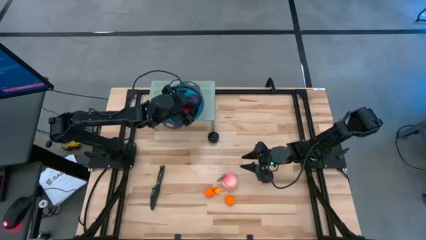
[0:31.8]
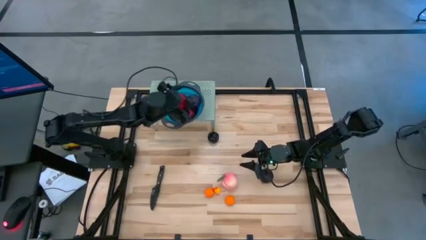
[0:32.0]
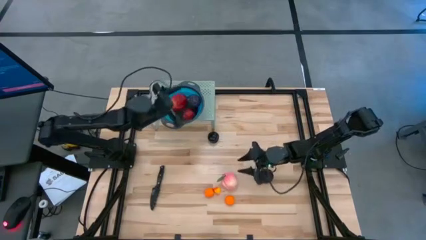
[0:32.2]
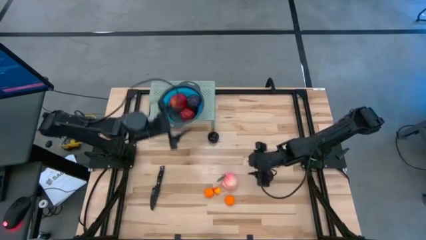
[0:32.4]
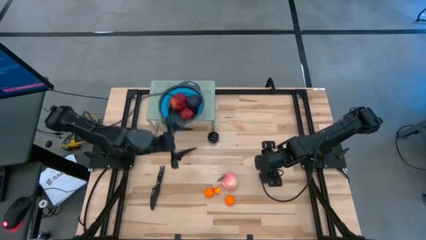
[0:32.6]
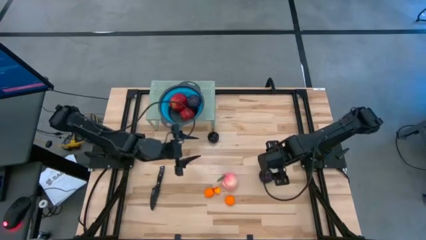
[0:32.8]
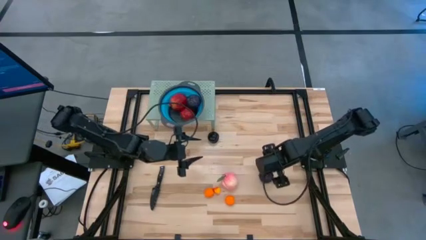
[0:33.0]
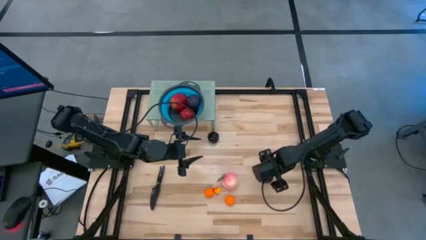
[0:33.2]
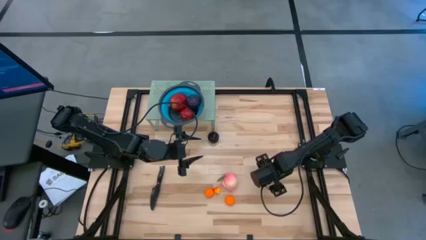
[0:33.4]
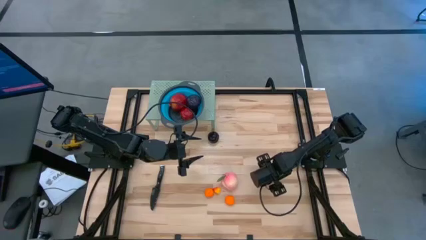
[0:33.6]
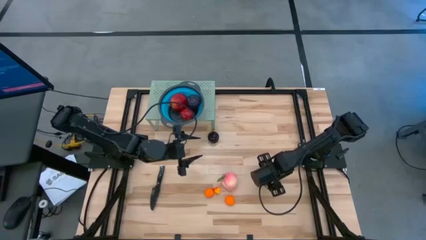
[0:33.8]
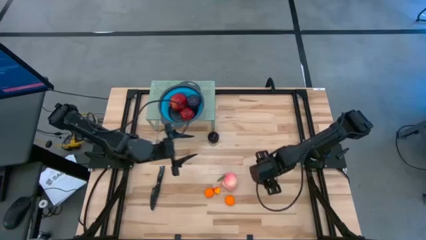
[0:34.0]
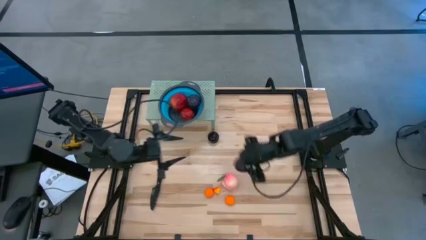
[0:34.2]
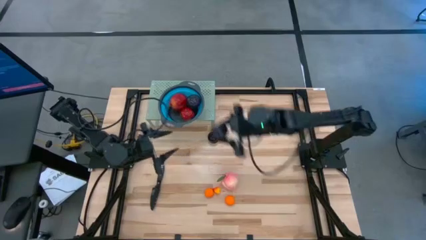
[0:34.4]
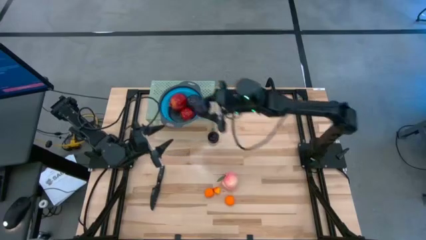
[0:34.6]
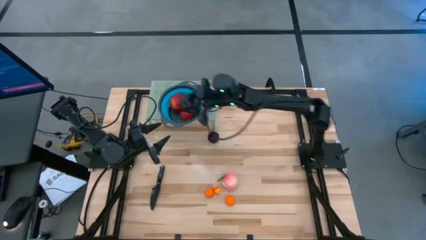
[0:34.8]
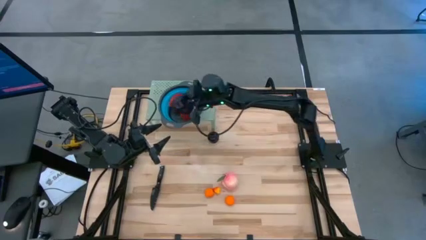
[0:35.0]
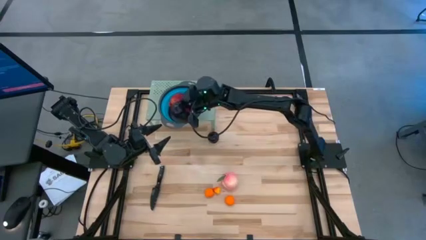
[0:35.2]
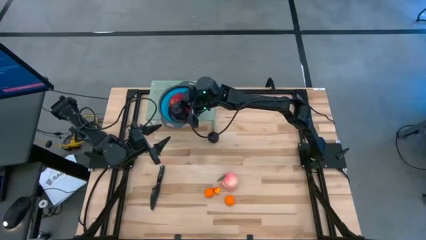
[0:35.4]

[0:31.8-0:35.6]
Task: Pick & Place Fruit
Put the bottom black plum into the blue strainer bowl on the shelf

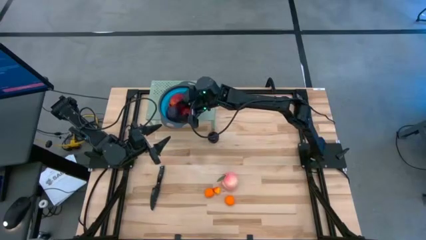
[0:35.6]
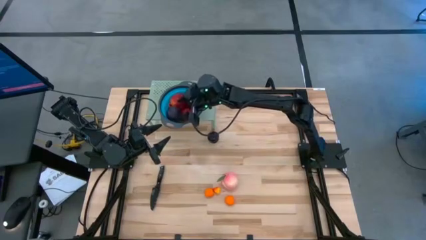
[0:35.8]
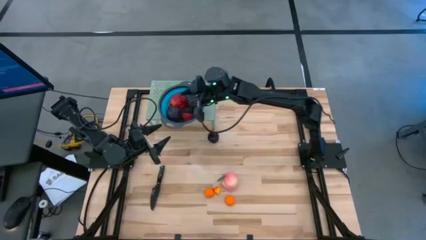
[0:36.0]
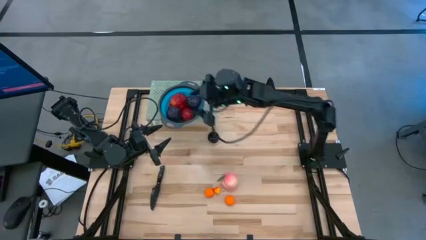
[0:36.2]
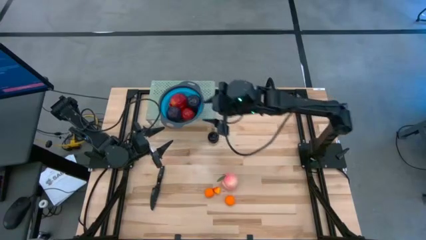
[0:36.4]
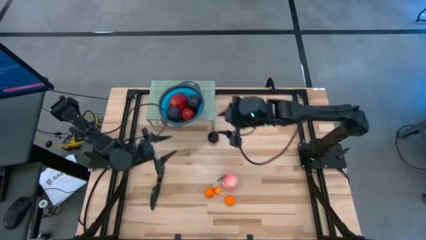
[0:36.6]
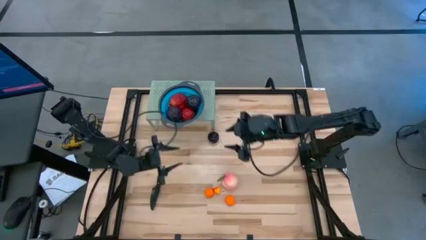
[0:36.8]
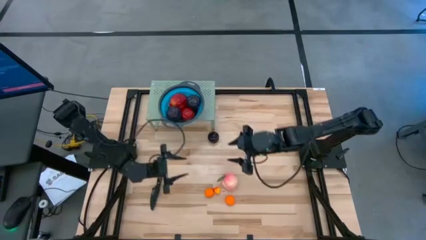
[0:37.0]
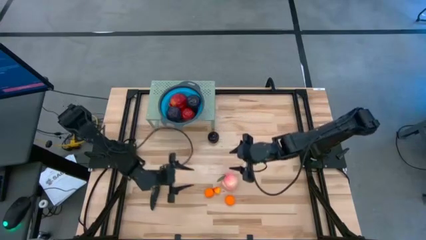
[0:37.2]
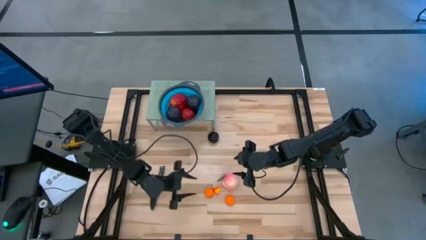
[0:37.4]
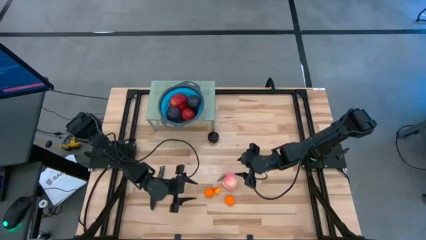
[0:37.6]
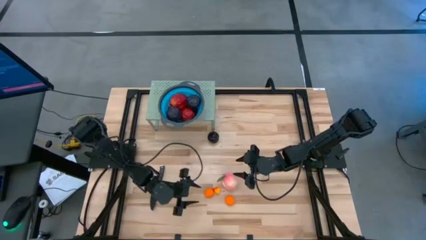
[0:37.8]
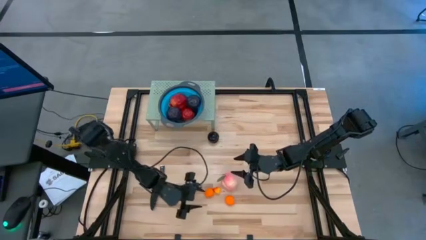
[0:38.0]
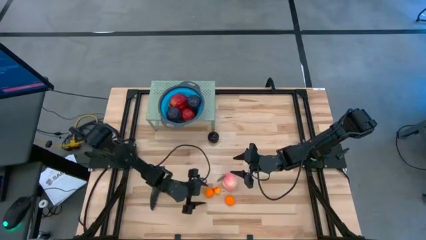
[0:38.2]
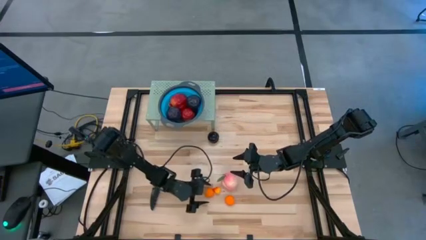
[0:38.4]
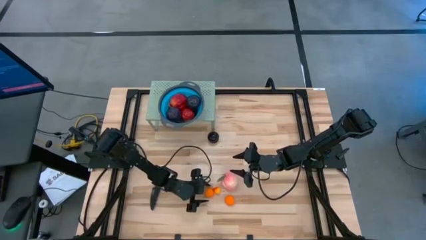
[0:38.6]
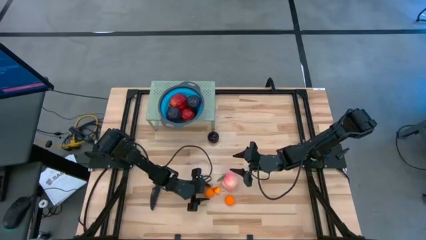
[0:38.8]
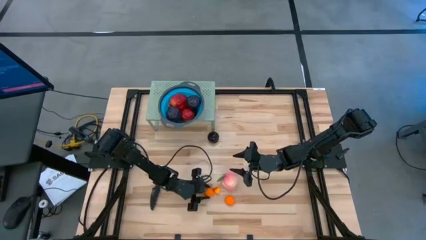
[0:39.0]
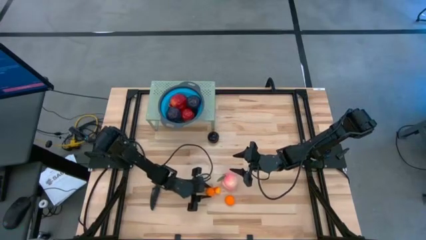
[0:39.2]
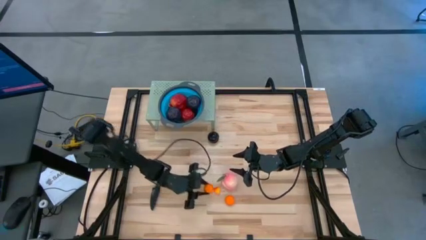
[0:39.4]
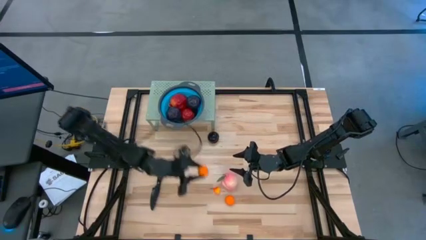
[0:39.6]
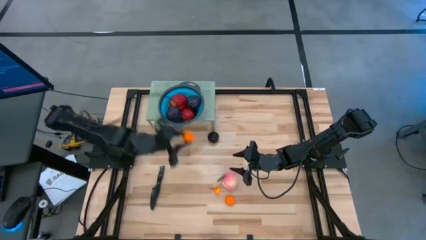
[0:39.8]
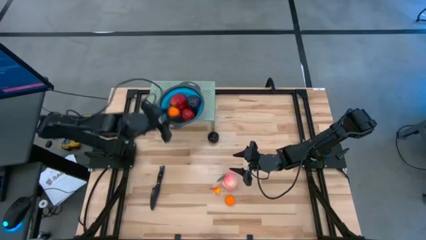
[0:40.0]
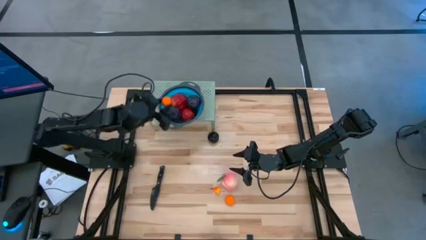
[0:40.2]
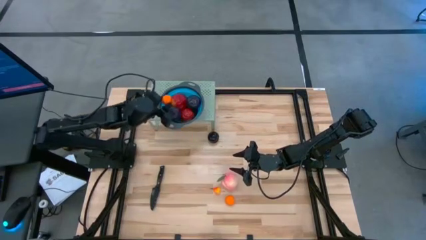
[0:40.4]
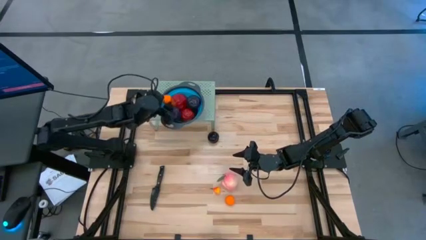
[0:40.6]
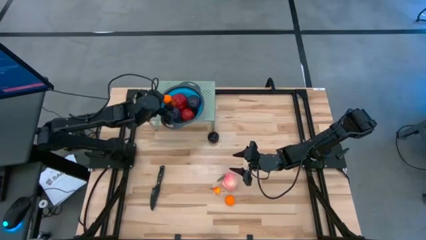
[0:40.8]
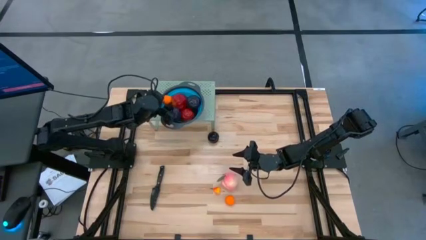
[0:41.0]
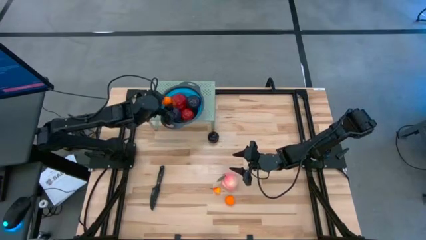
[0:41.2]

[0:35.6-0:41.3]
Put the top orange into the blue strainer bowl on the shelf

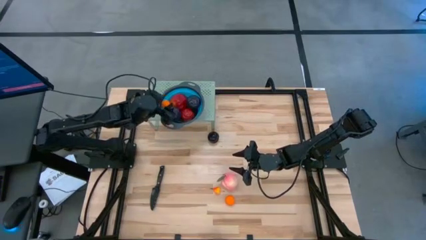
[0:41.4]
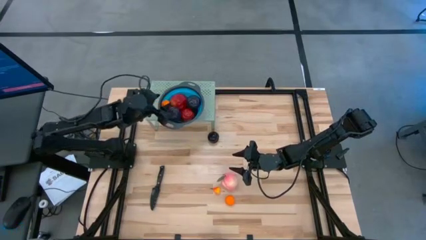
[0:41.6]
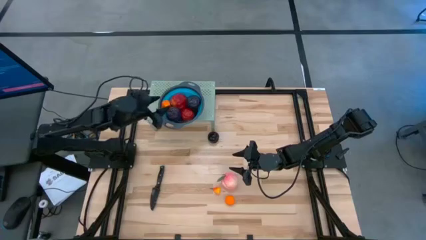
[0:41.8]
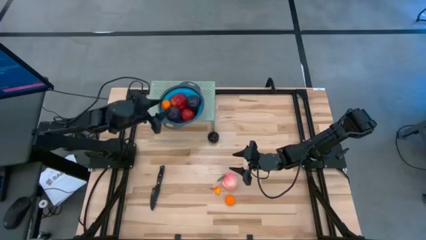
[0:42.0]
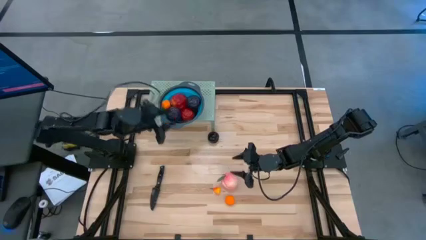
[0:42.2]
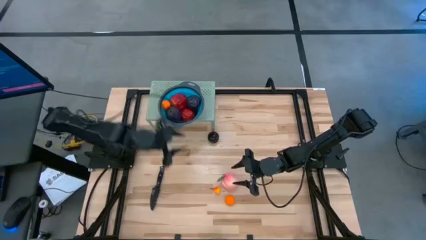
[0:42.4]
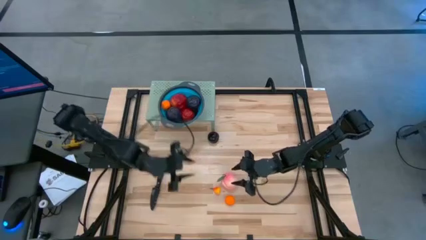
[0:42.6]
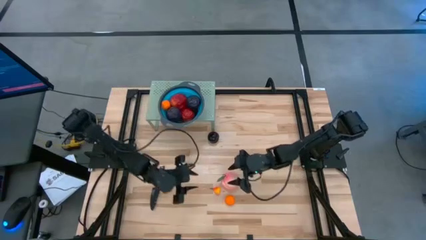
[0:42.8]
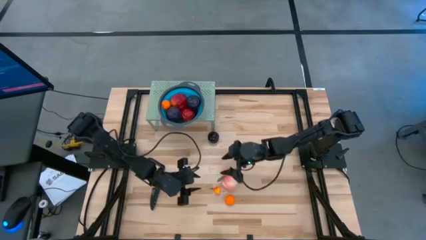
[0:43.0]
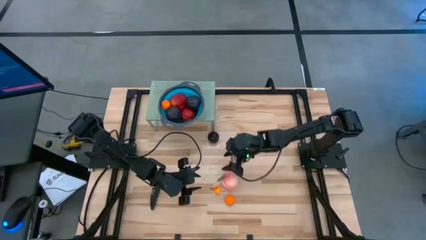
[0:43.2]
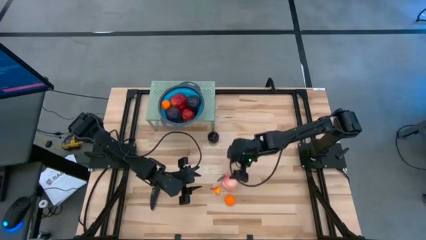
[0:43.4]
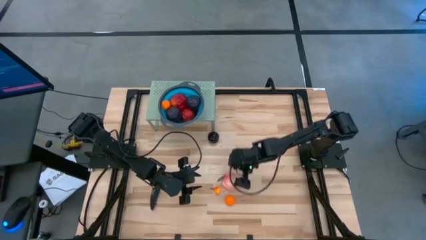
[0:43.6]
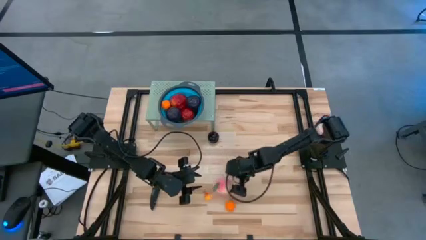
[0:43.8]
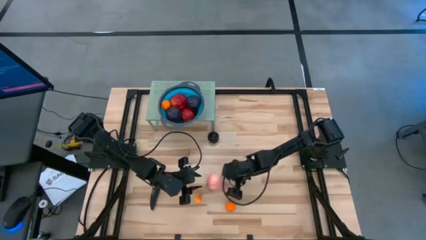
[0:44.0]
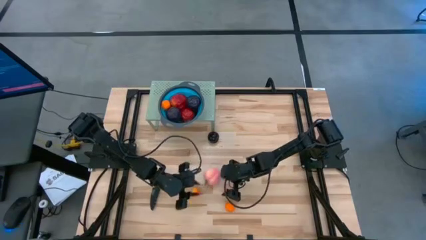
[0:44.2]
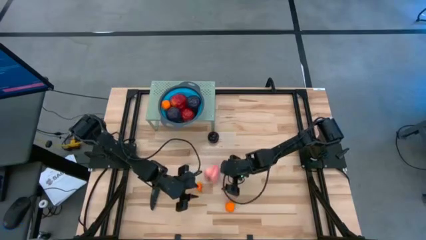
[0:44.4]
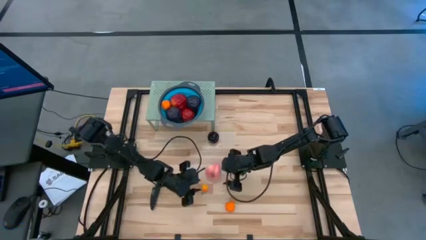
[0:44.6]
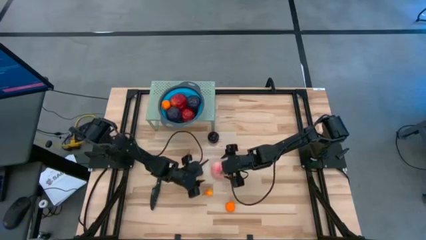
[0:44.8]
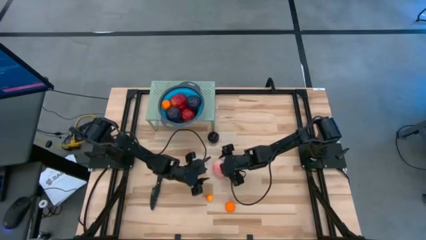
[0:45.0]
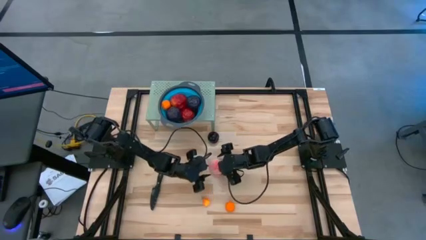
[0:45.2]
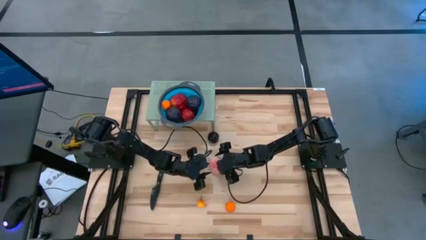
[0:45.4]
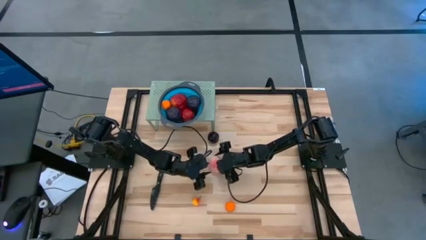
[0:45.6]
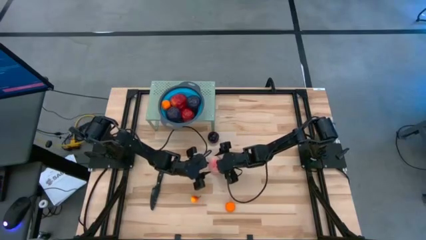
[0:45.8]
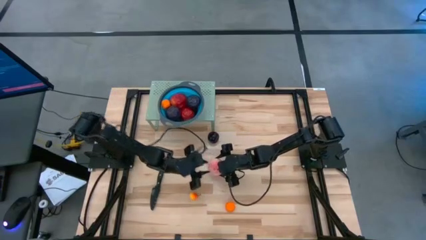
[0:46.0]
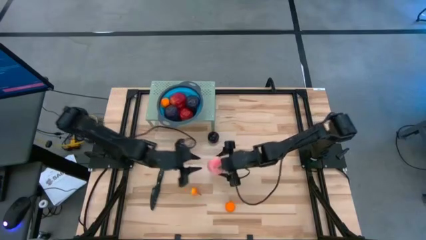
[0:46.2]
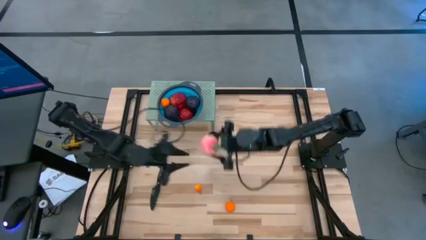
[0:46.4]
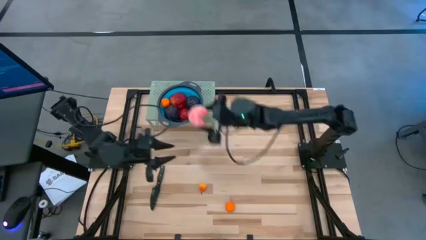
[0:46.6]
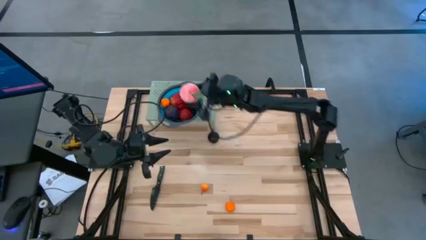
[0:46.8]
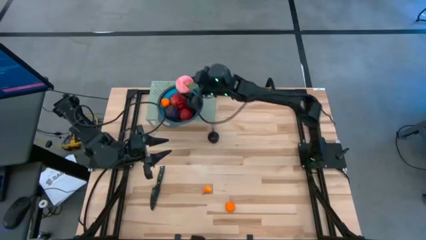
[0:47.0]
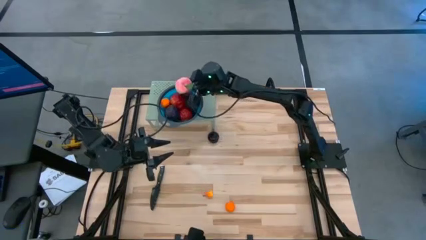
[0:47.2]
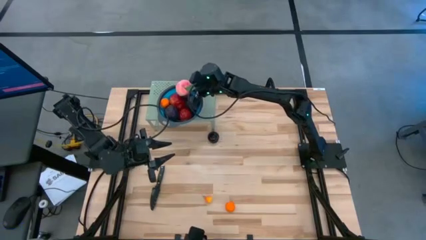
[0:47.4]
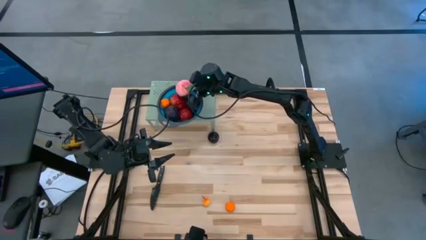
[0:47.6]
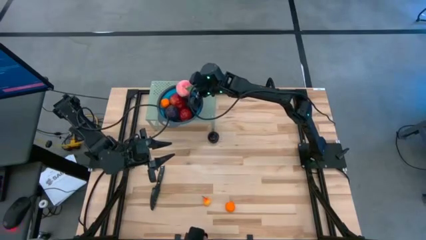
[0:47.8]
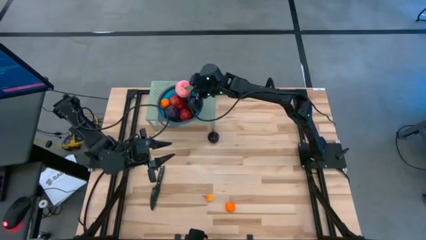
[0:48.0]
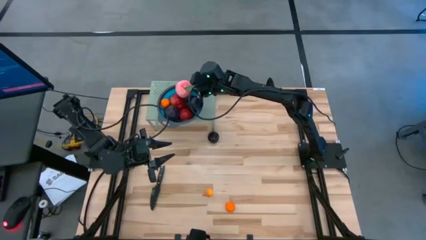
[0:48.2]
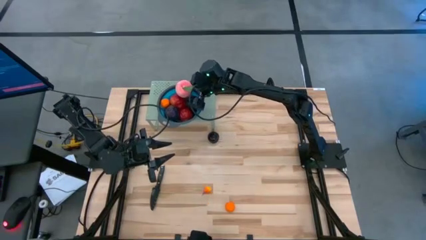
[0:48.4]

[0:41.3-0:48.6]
Put the pink peach into the blue strainer bowl on the shelf
